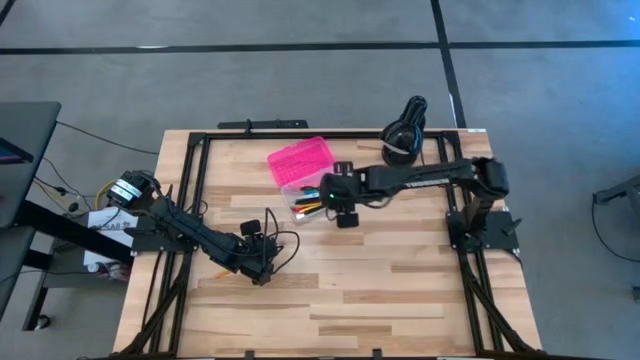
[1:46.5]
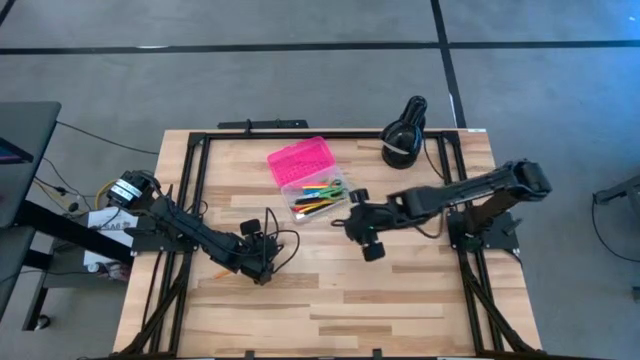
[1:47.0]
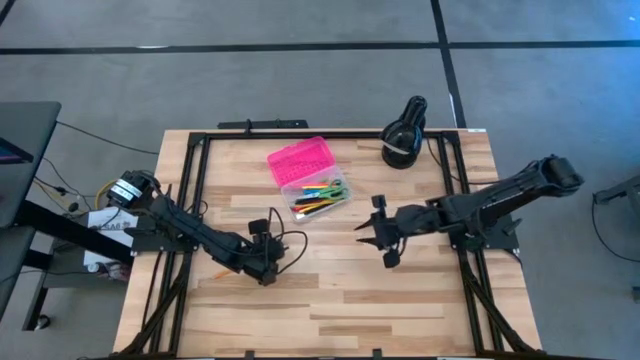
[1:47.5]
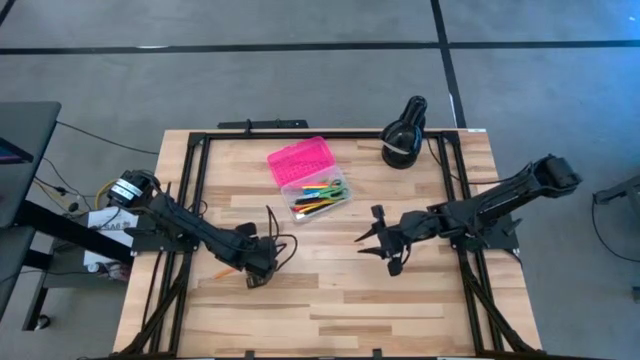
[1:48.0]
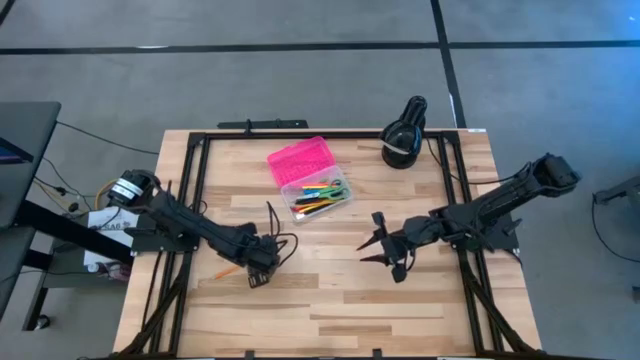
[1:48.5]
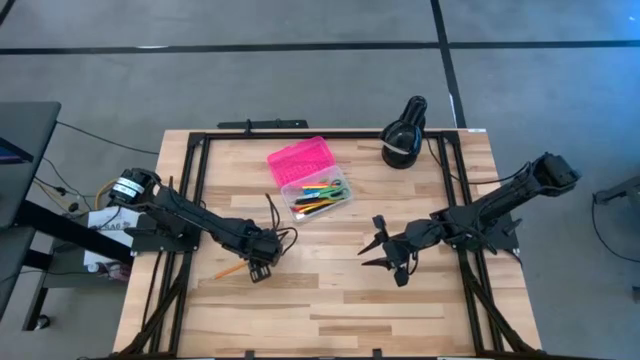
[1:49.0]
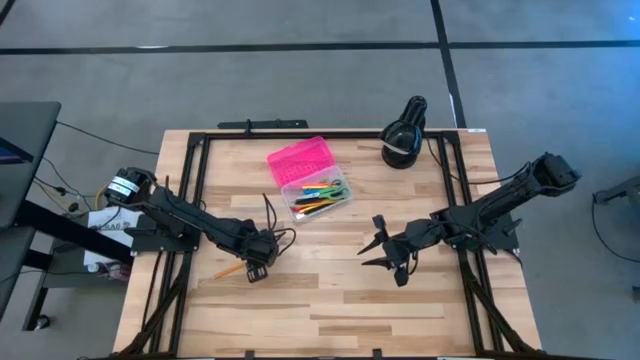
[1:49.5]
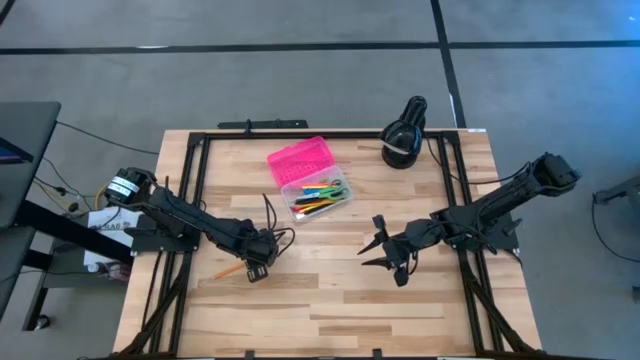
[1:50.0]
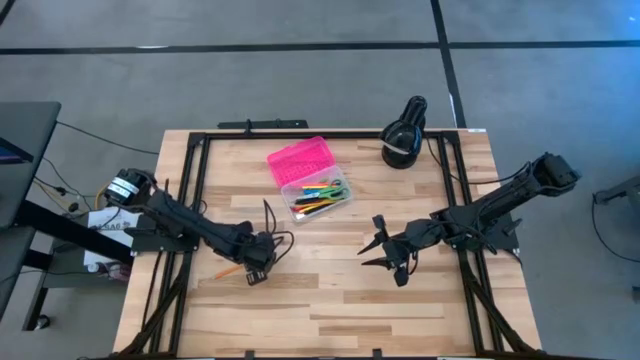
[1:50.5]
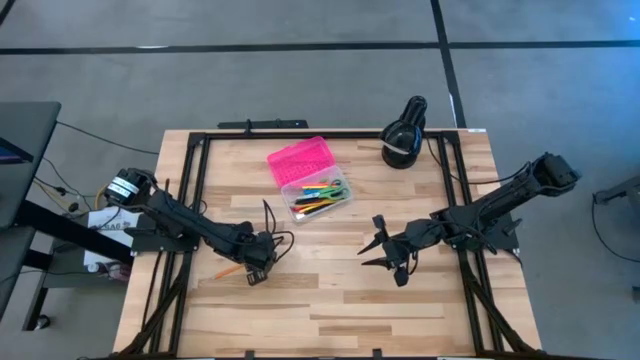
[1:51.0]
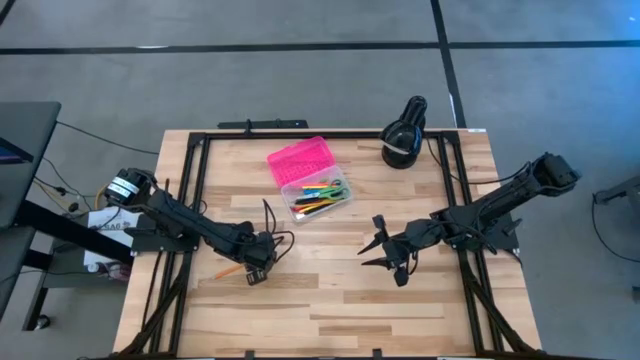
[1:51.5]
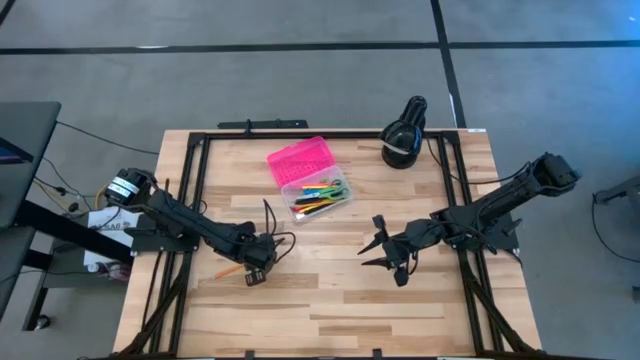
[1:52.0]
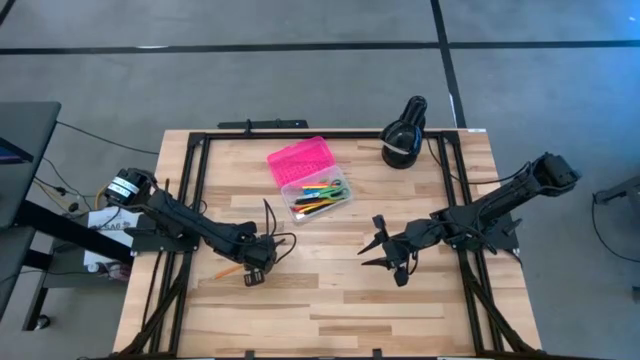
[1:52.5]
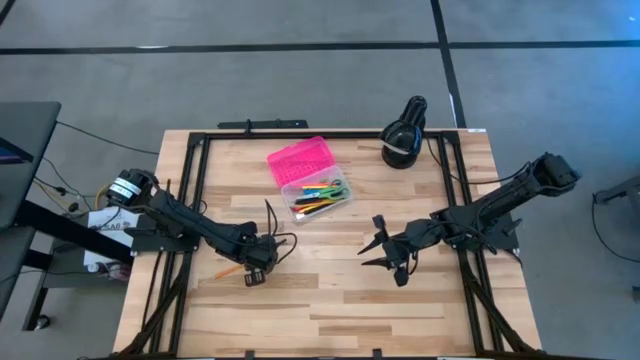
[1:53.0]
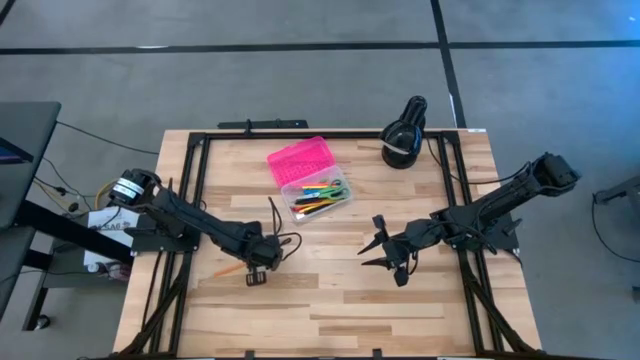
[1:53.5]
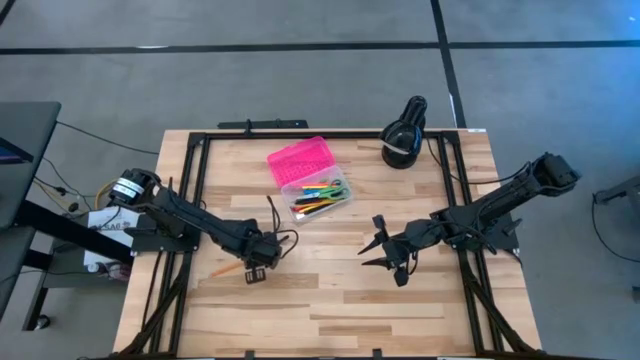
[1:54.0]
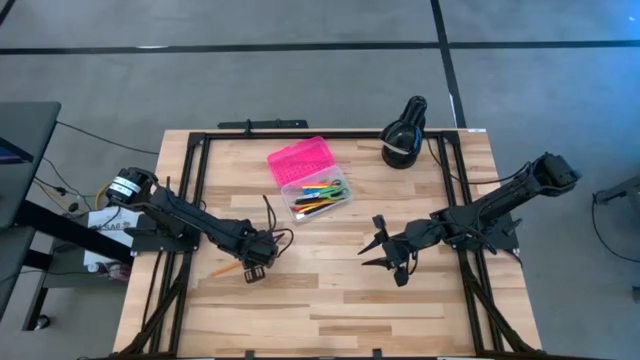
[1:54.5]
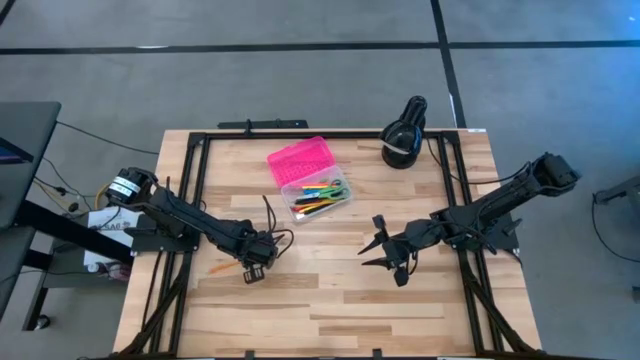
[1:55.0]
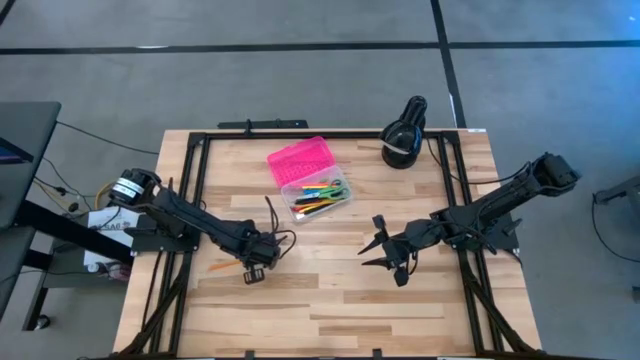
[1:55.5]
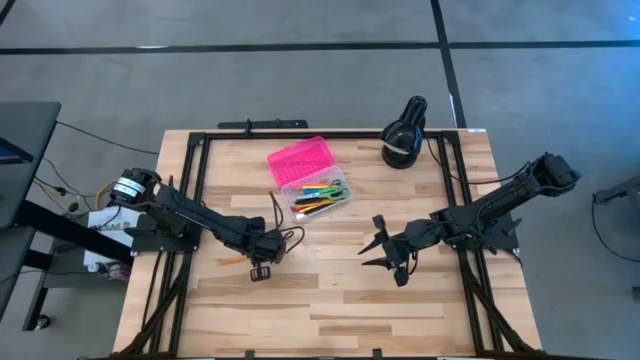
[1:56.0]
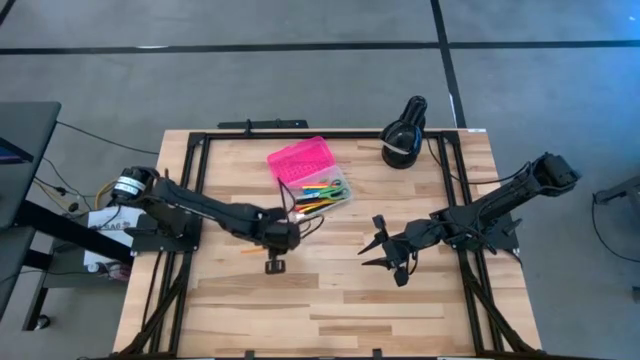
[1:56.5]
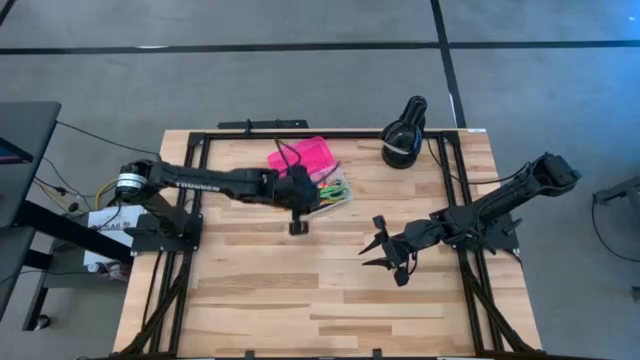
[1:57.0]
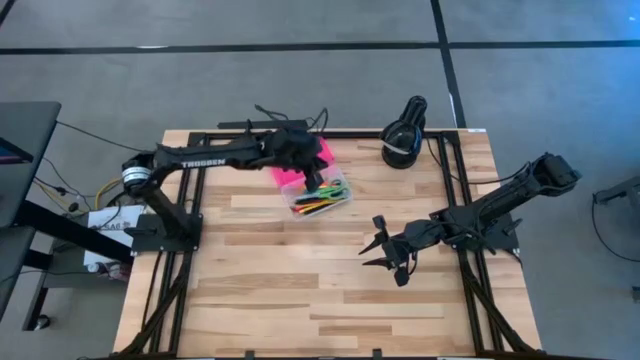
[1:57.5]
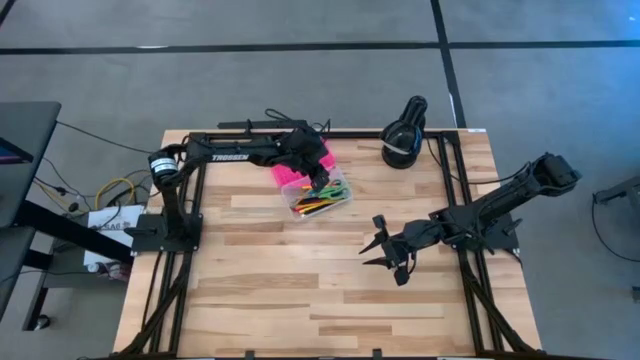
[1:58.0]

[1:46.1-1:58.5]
Task: Pick & place school supplies into a supply box
Put the orange pencil into the pink supply box

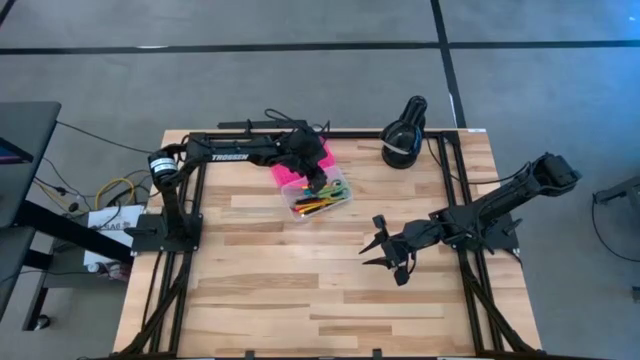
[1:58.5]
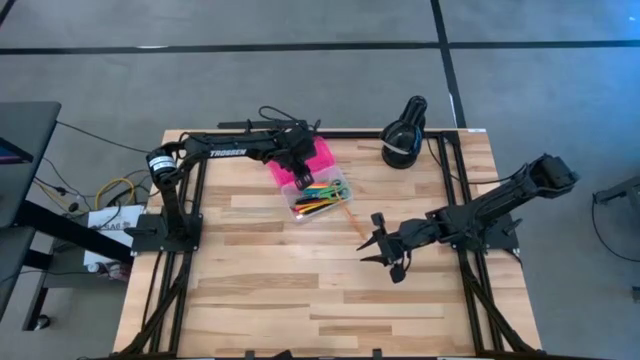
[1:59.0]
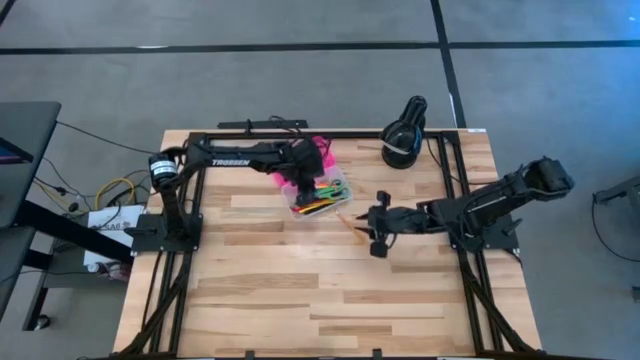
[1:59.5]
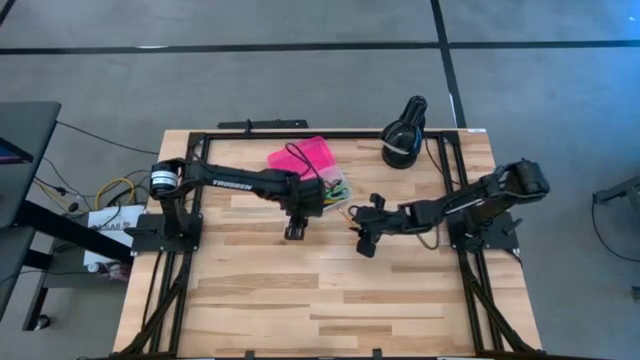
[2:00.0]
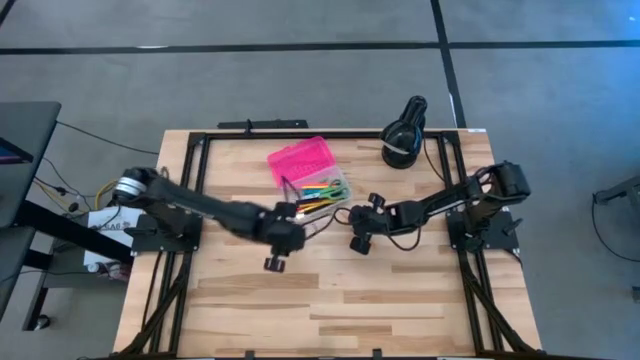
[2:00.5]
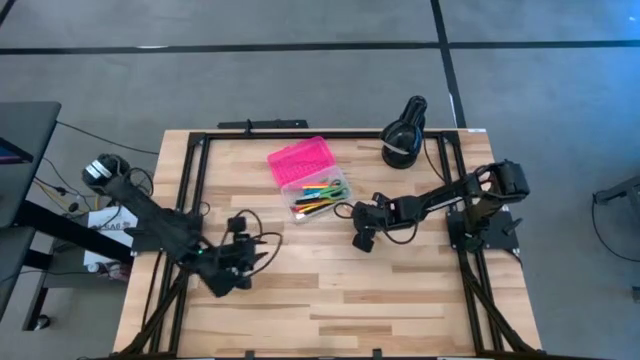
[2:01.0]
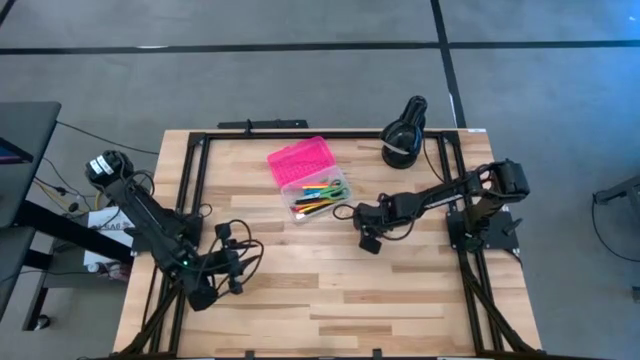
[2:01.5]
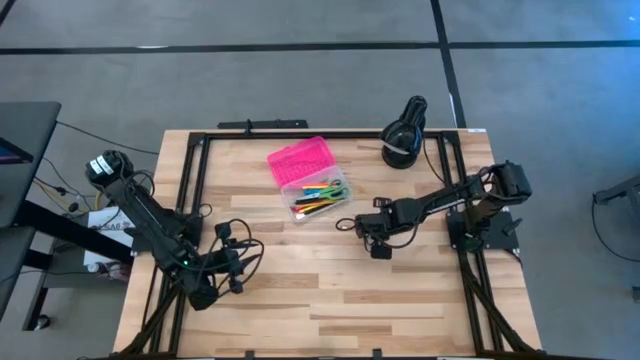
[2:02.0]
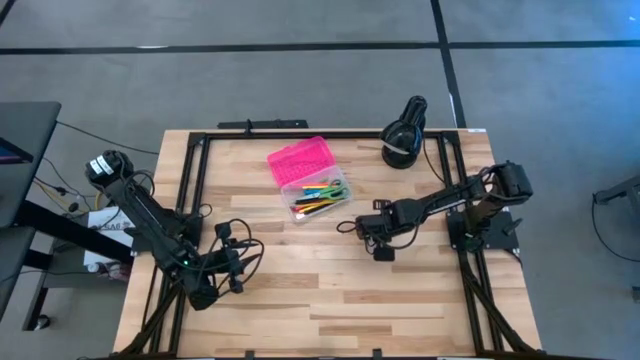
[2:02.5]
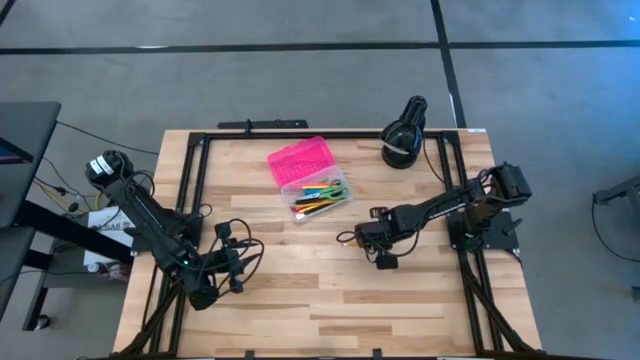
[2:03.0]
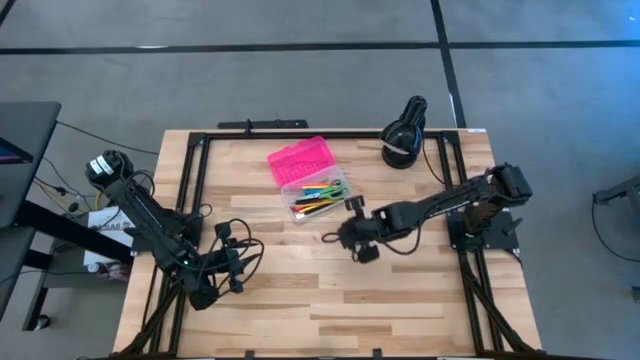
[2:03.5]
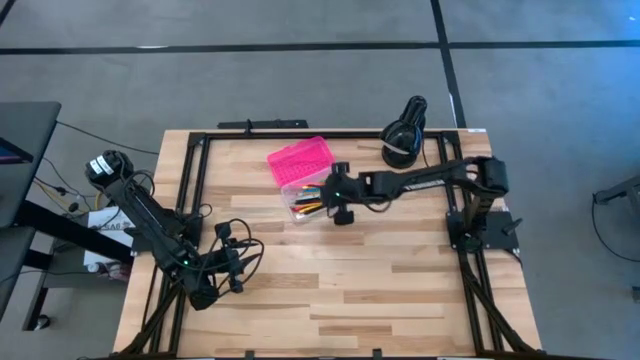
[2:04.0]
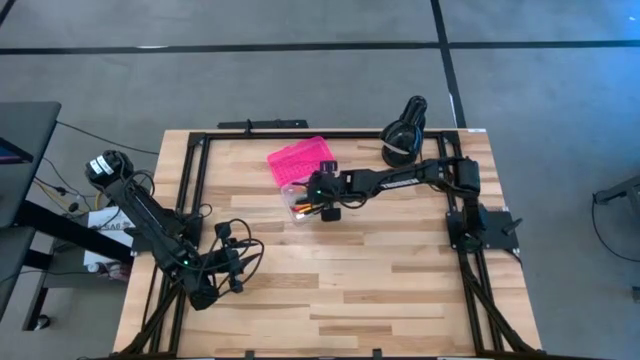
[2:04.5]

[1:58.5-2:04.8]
Put the orange pencil into the pink supply box

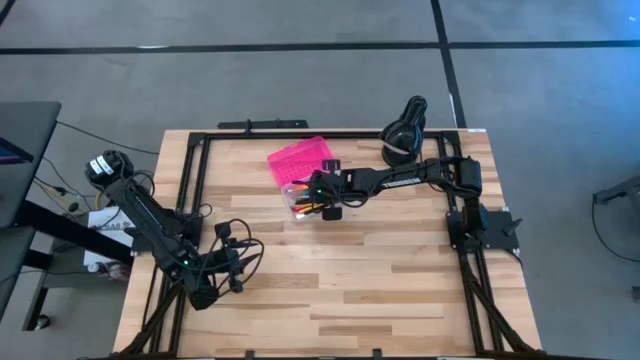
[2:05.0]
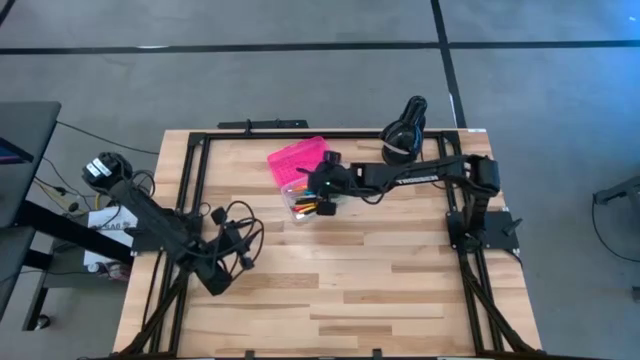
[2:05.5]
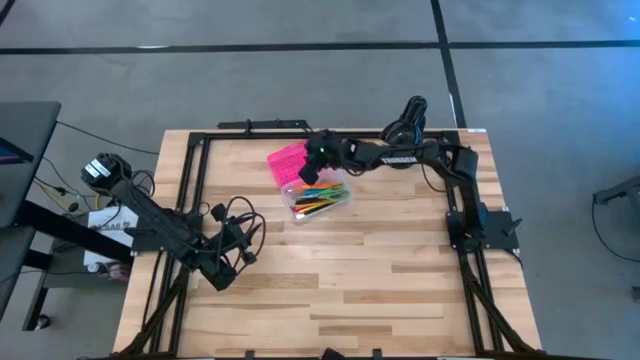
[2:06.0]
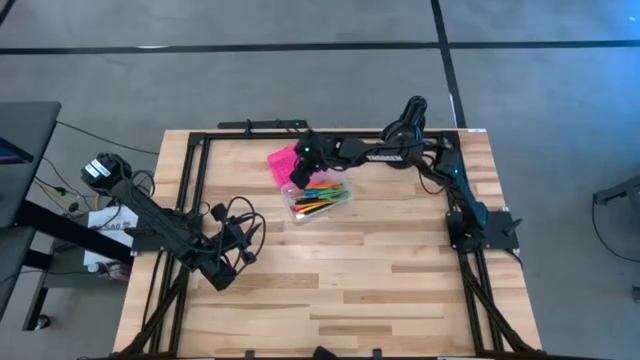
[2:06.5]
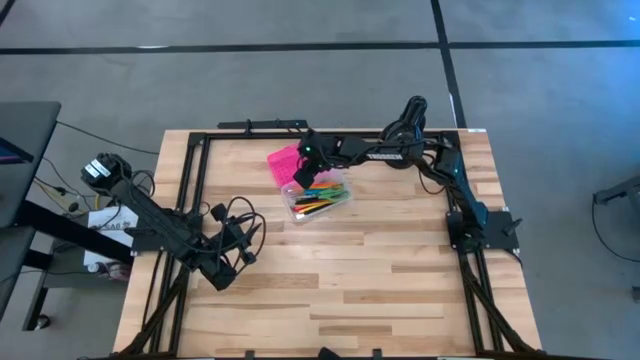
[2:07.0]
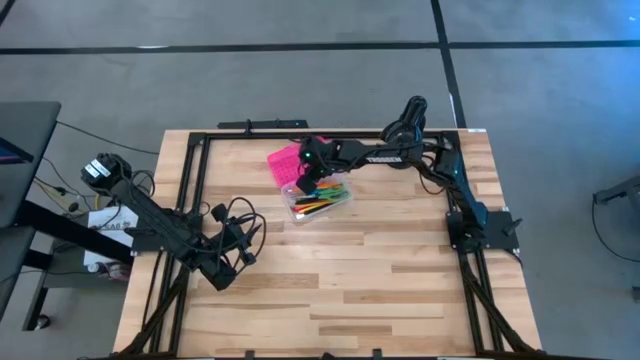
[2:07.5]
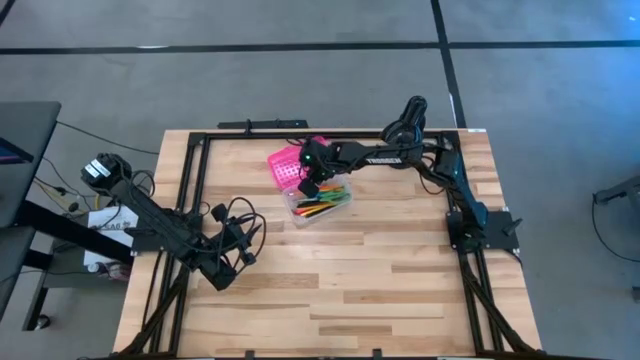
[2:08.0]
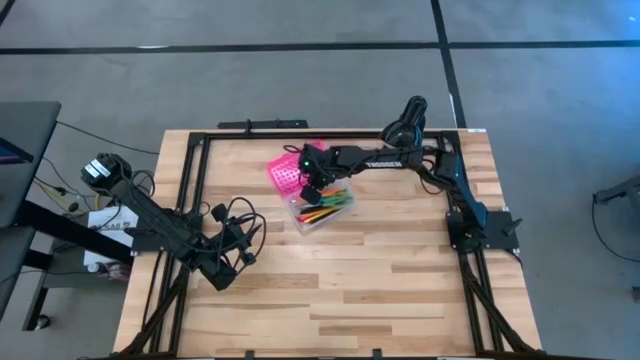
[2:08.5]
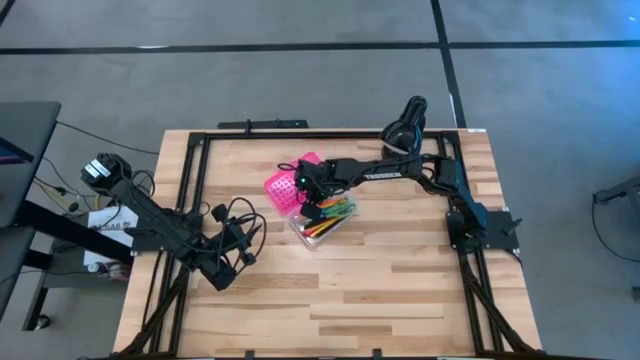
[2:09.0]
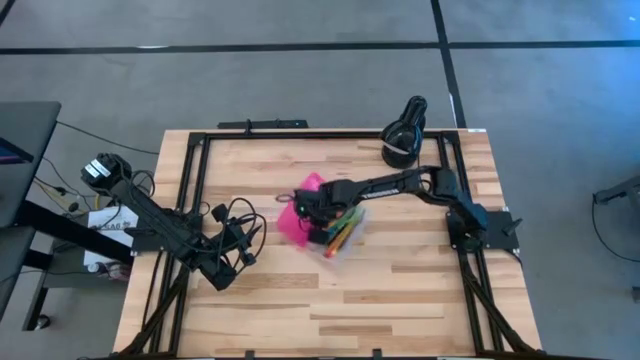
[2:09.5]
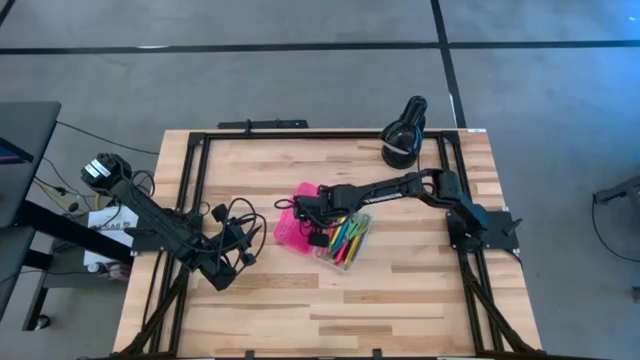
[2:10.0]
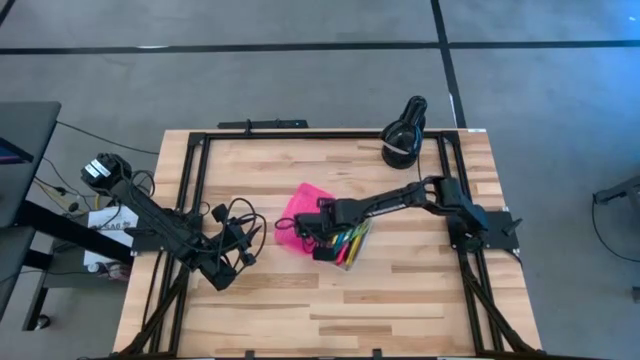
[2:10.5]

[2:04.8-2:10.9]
Move the pink supply box to the center of the table
